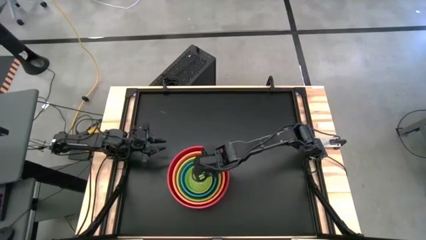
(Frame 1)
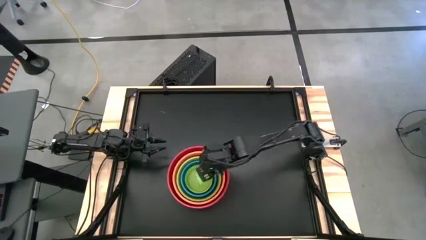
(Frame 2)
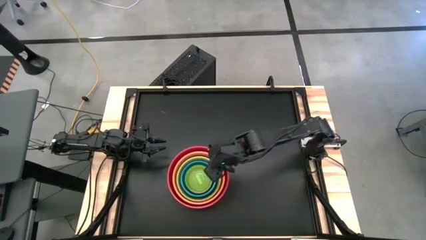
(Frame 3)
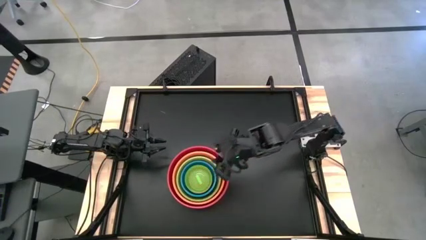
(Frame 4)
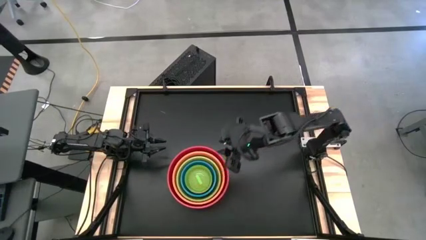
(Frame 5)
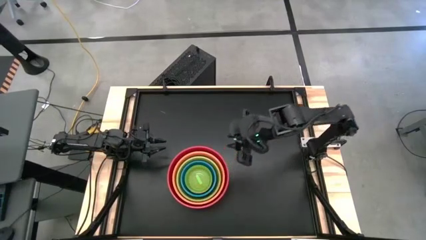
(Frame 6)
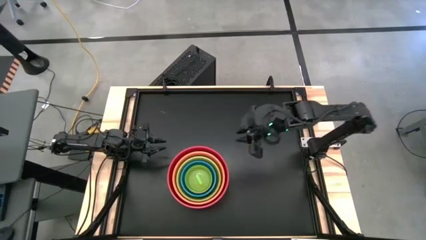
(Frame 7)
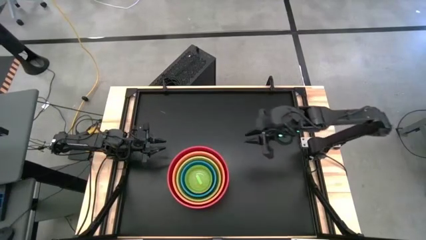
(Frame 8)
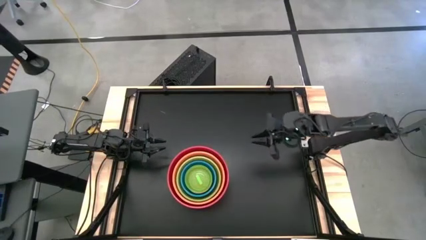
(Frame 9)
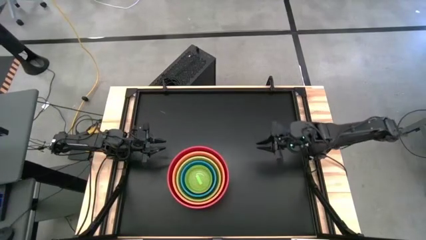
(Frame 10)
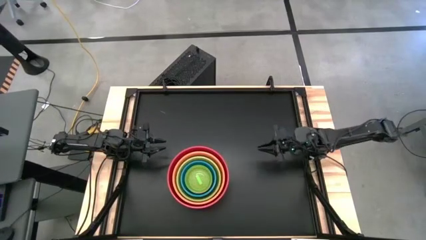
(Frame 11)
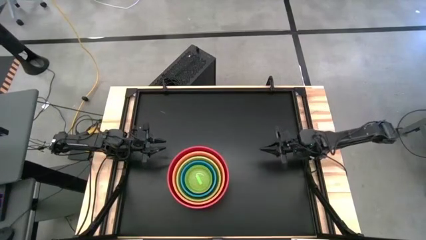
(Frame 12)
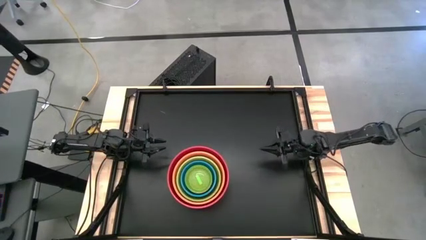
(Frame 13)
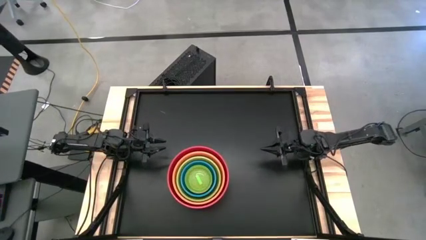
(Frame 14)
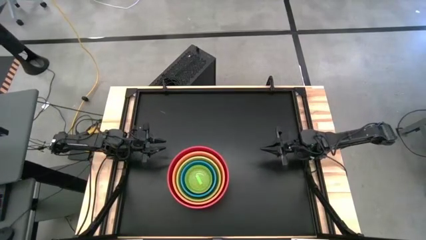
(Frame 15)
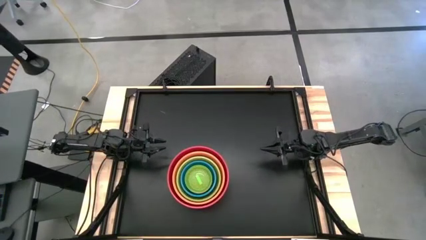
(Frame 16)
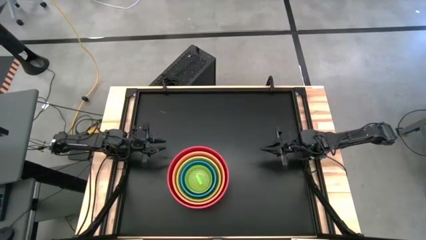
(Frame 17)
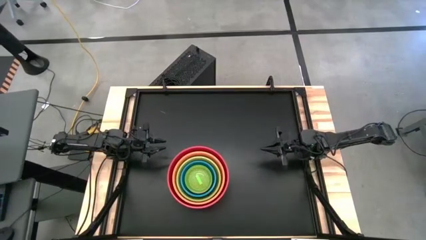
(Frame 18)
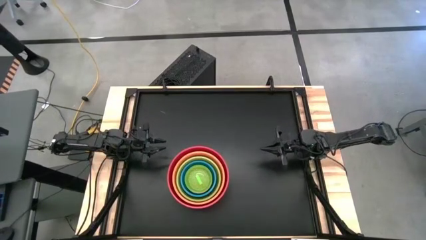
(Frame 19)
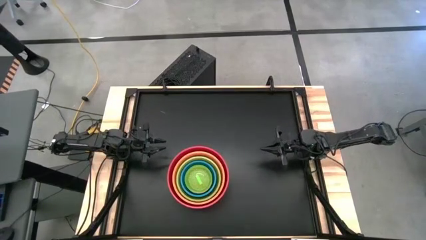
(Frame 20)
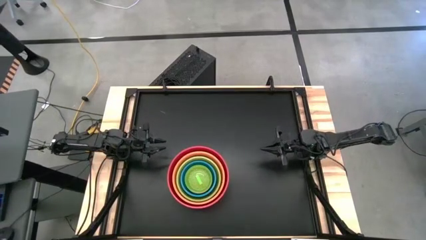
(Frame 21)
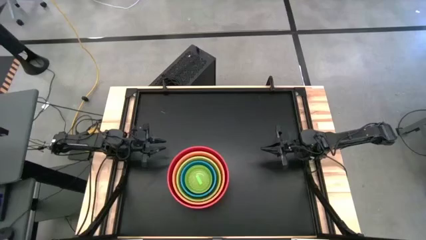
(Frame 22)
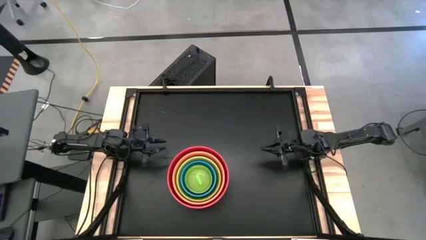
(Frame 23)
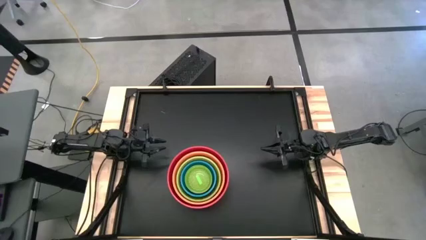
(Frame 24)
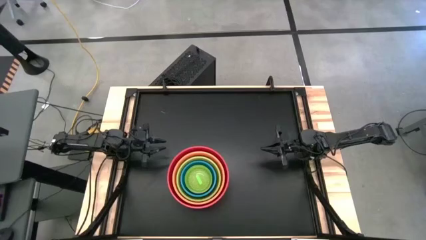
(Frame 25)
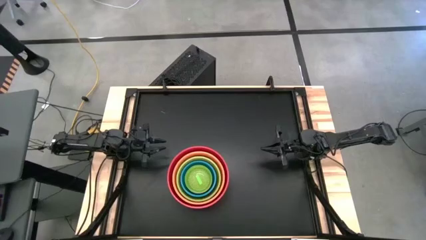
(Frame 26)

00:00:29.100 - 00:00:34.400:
Return to Home Position
